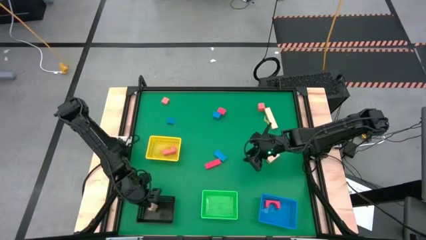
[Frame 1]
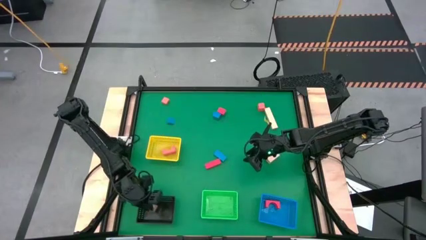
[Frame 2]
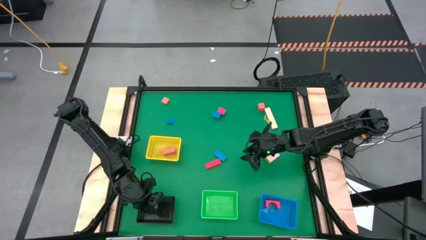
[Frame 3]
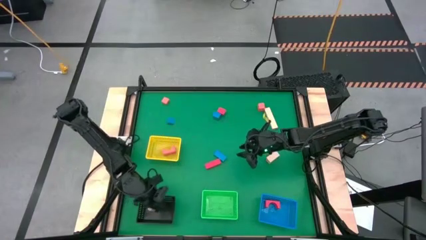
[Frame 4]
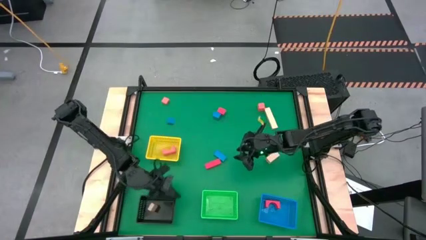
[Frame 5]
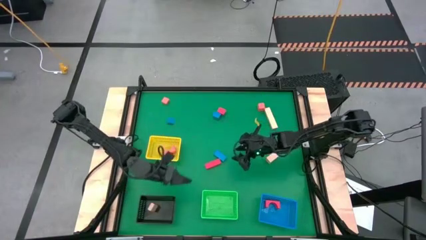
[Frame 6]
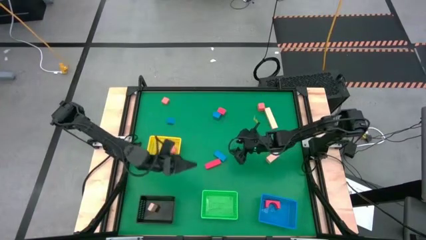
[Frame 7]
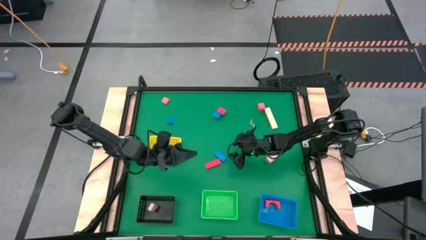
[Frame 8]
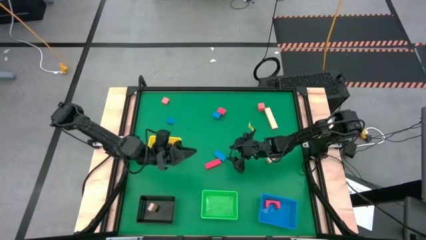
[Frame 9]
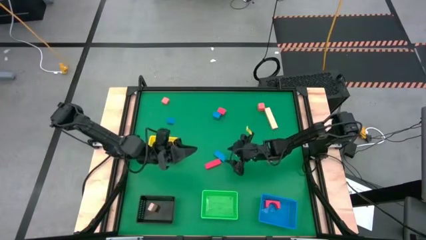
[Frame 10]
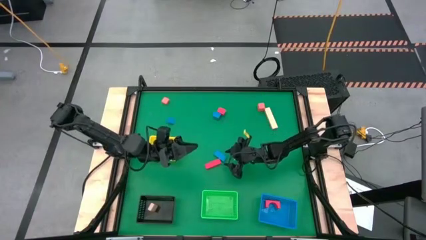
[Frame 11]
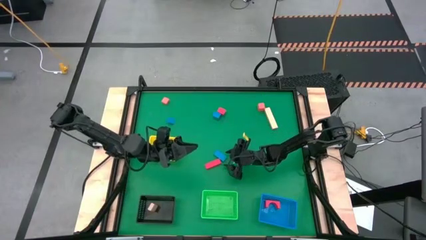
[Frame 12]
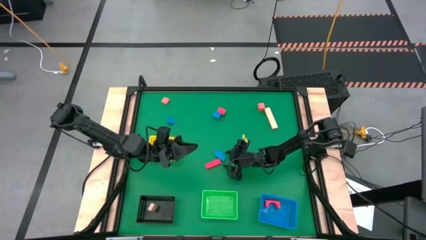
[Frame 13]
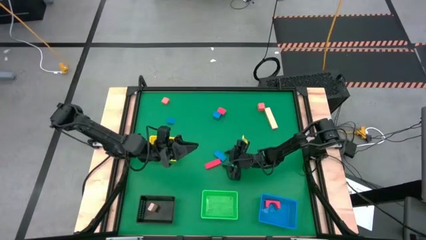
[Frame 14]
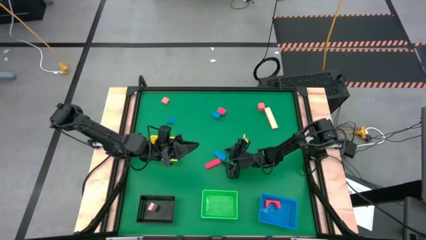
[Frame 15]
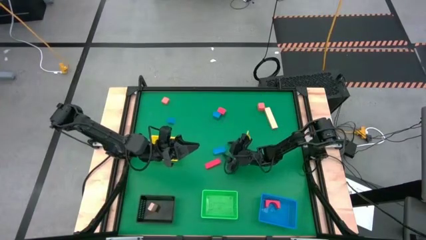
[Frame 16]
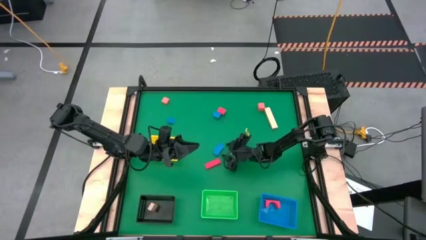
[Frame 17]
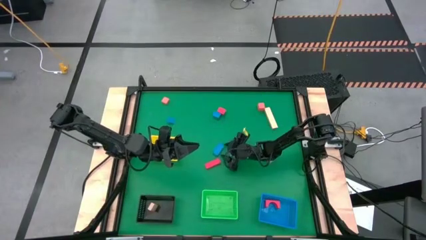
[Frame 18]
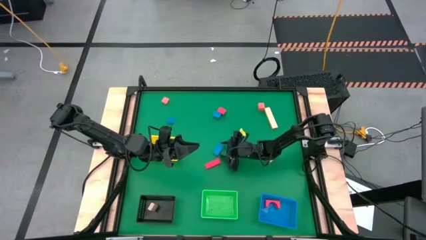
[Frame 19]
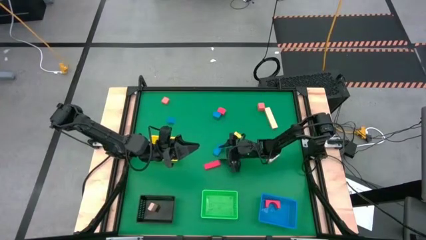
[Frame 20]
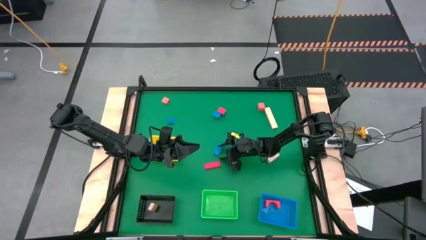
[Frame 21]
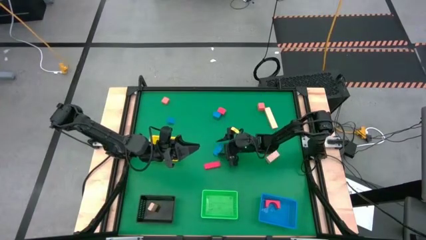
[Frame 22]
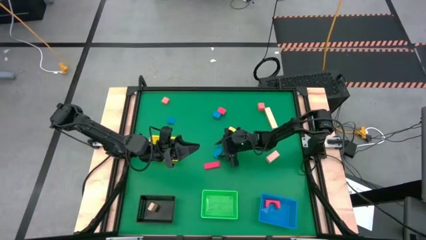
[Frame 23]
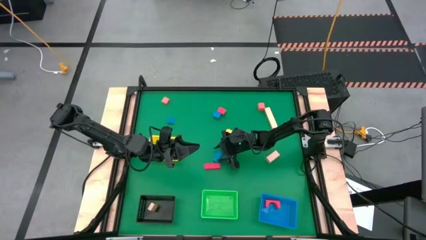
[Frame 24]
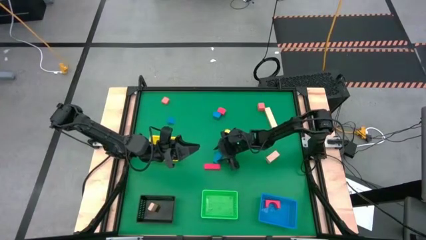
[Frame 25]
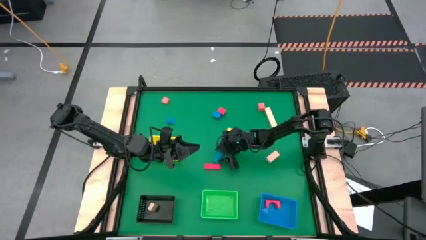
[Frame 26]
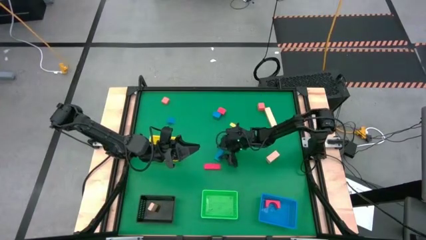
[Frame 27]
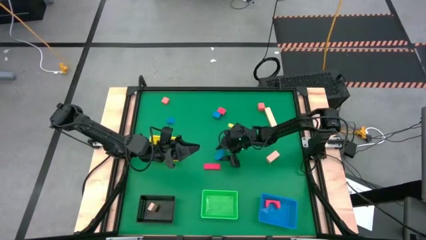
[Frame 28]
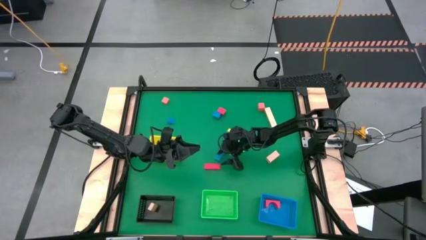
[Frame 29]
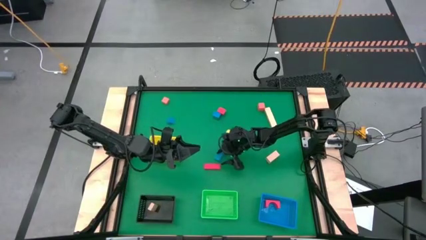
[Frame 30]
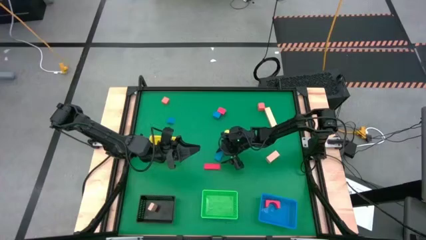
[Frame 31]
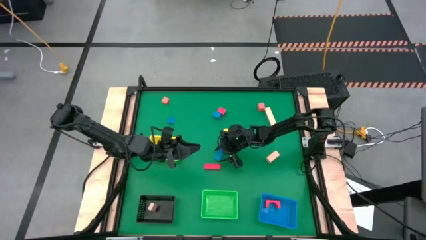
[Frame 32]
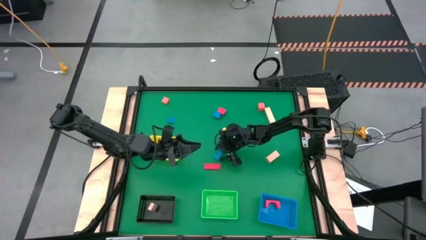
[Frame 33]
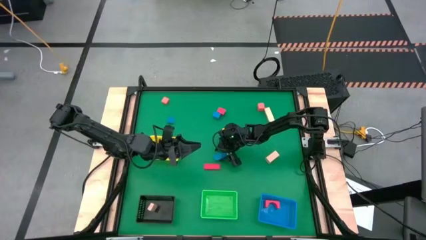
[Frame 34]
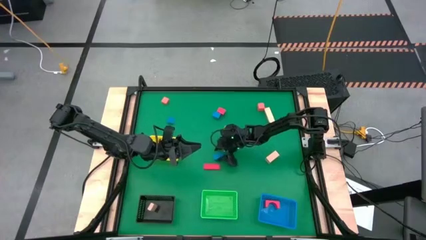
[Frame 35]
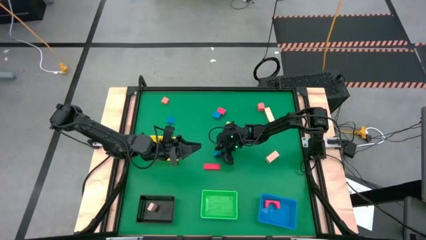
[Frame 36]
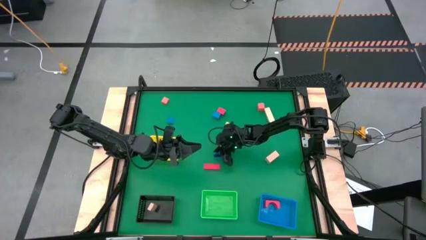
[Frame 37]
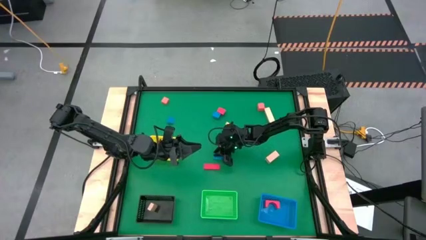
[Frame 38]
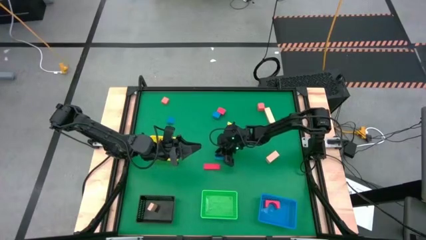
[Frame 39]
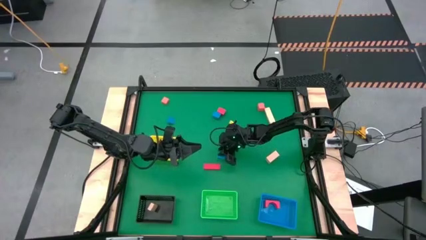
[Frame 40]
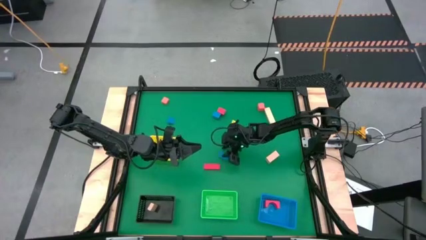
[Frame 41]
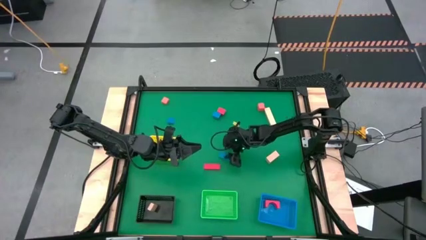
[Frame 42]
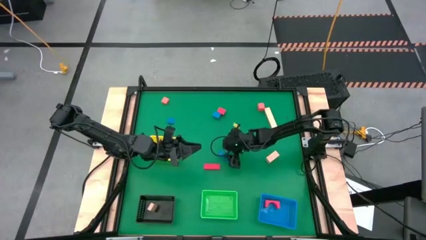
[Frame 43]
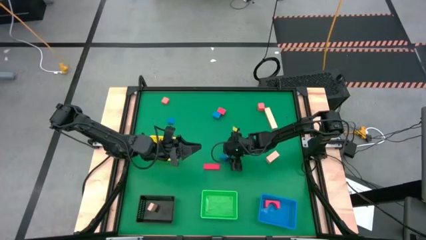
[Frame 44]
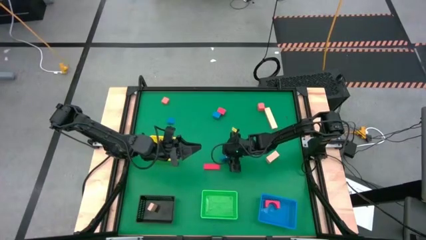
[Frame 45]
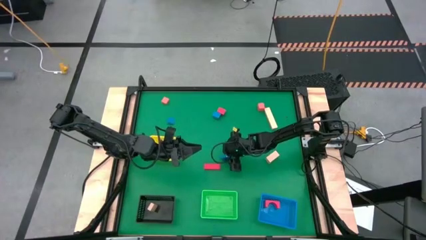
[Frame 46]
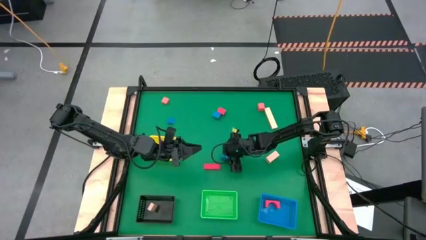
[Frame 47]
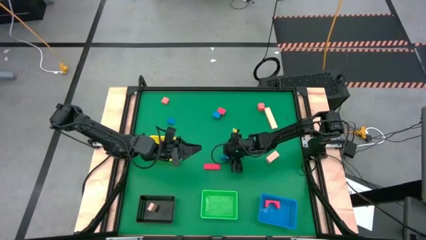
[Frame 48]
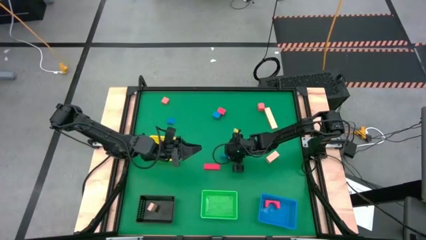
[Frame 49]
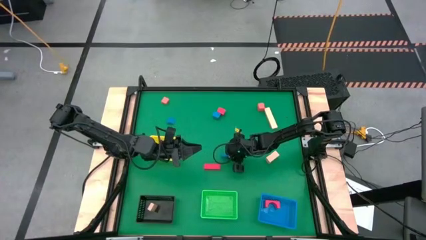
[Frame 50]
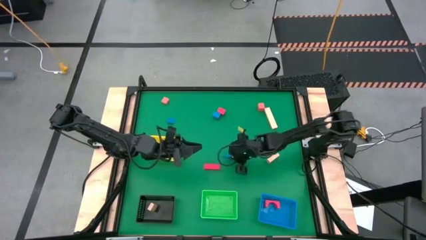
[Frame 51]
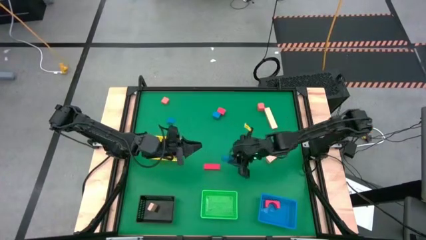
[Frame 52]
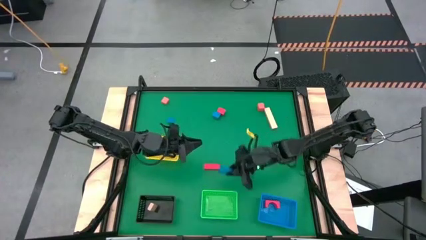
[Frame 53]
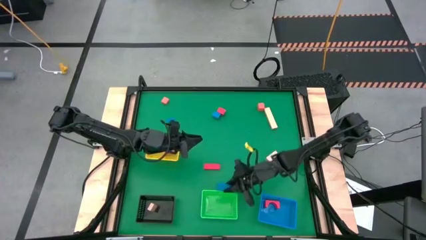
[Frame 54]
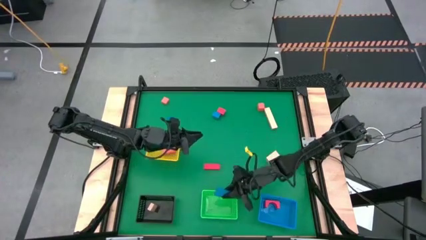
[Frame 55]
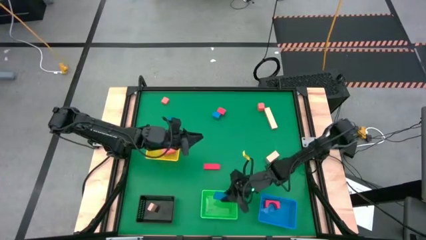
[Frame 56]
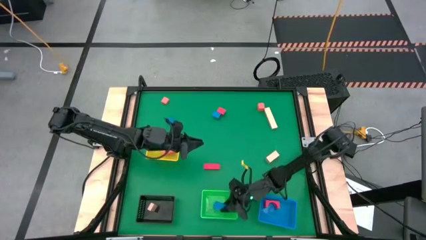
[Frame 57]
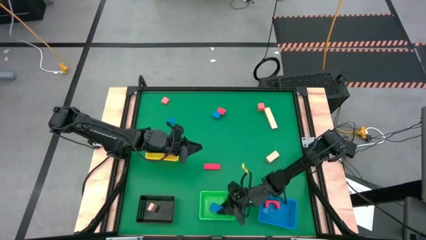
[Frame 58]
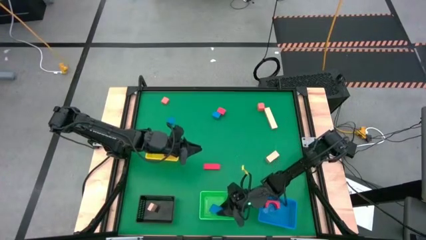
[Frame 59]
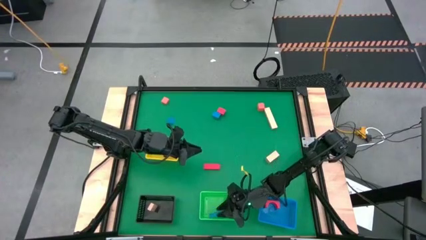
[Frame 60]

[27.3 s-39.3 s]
Task: Sort & place blocks by color
Put the blue rectangular block into the green bin

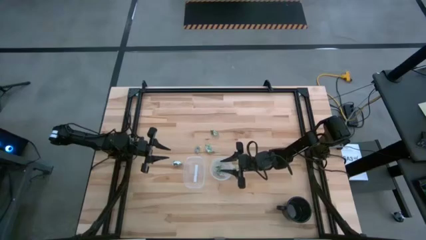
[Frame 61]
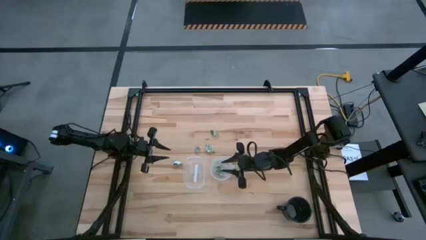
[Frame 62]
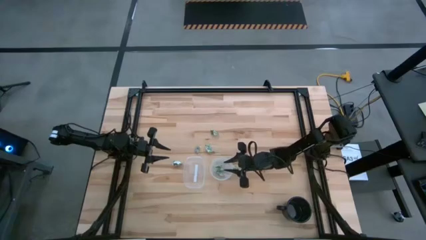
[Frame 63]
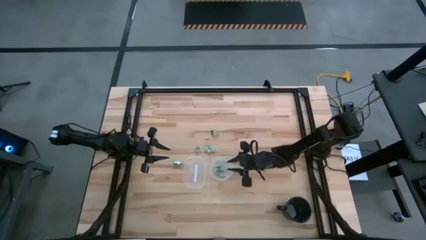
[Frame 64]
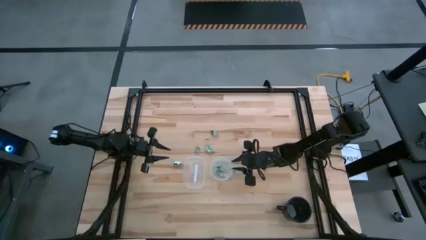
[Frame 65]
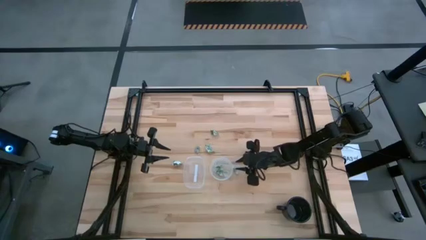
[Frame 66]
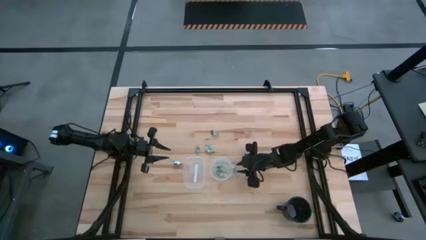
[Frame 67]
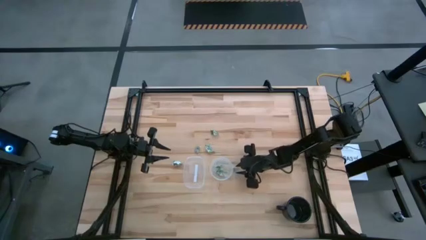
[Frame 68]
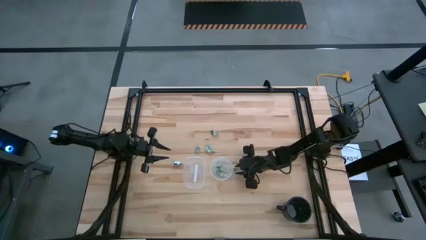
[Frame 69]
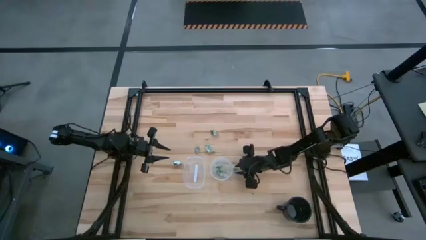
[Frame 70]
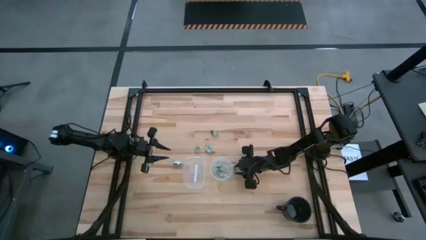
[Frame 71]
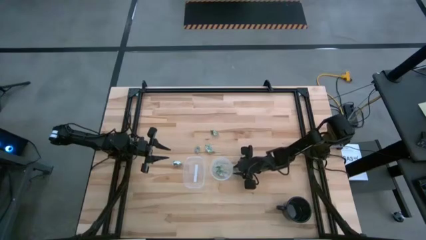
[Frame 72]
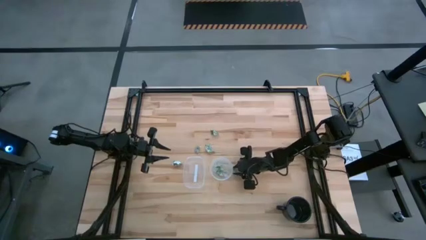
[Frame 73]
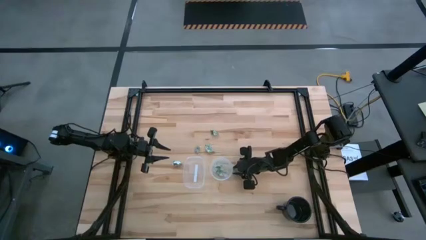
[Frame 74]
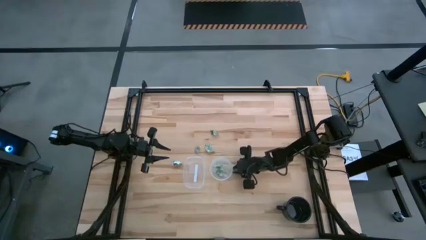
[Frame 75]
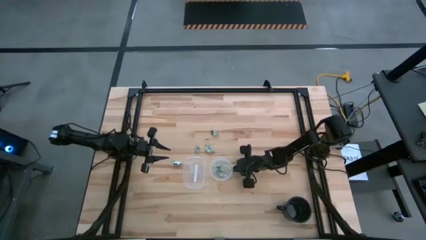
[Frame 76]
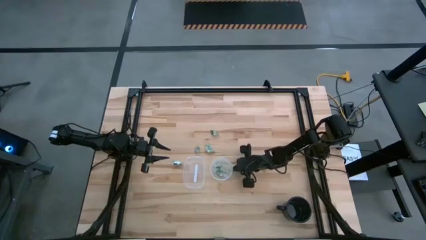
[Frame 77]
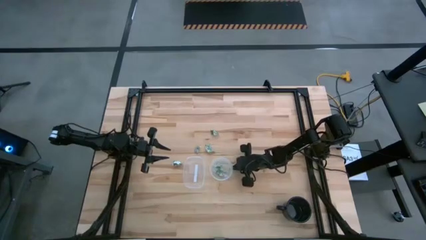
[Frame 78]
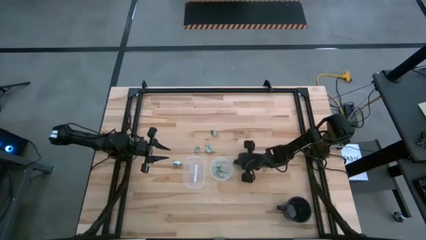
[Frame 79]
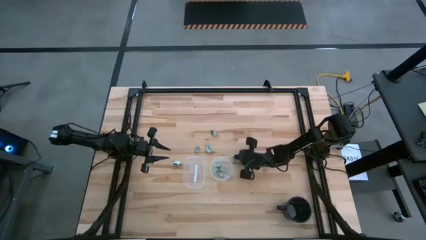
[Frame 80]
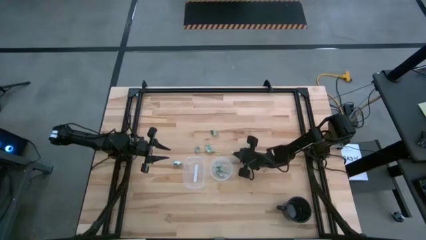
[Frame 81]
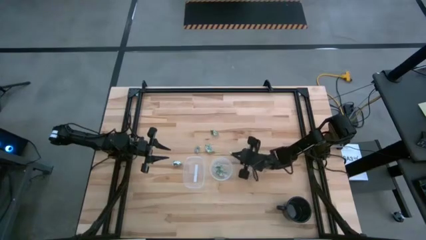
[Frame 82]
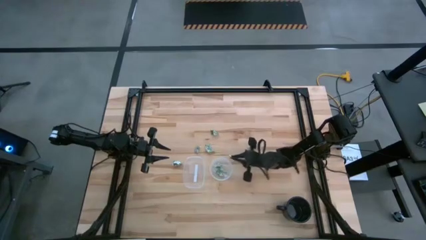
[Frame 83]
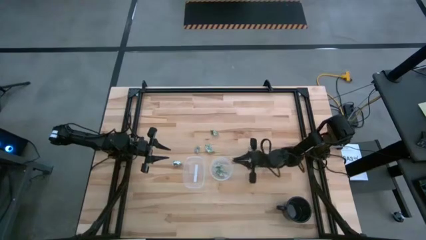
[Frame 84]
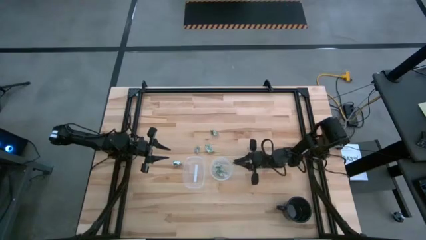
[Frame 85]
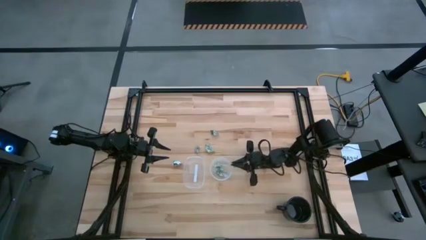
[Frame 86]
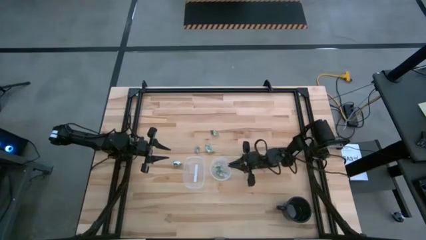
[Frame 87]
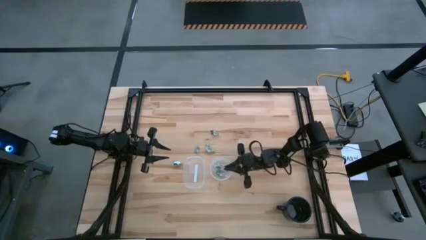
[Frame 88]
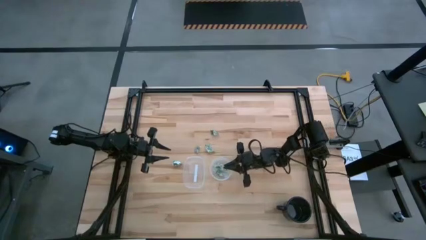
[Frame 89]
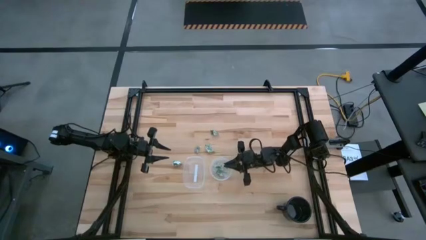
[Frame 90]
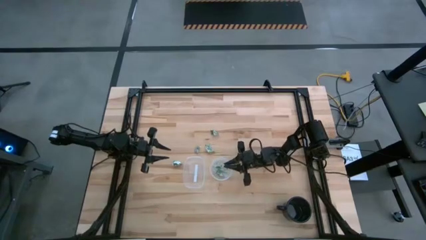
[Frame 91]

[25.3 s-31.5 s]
Task: Pick and place items into bin
Put the stevia packet into the right transparent bin
